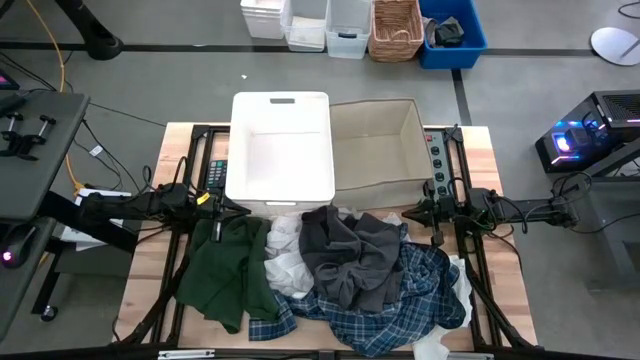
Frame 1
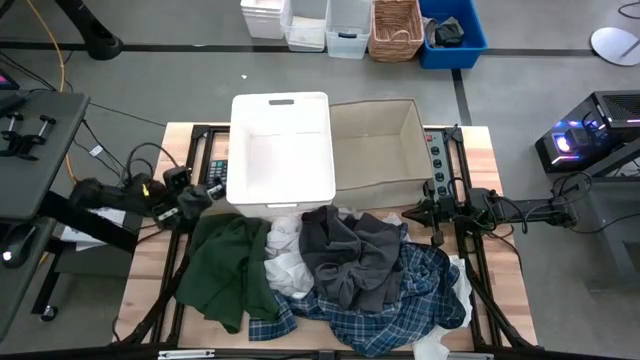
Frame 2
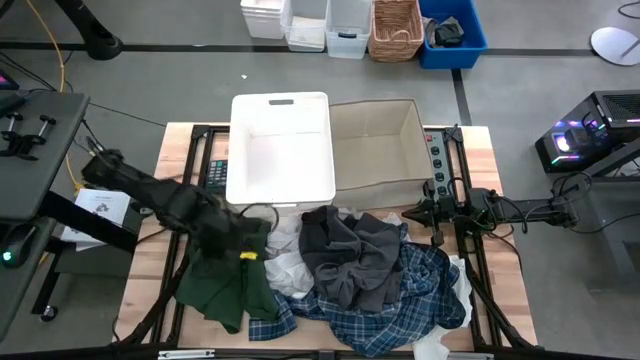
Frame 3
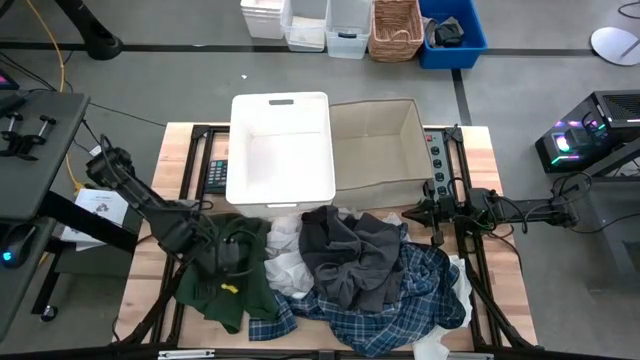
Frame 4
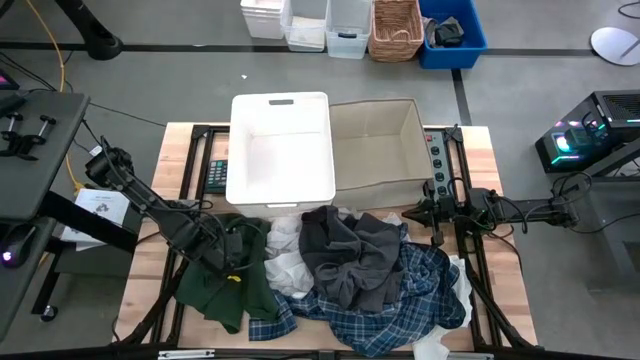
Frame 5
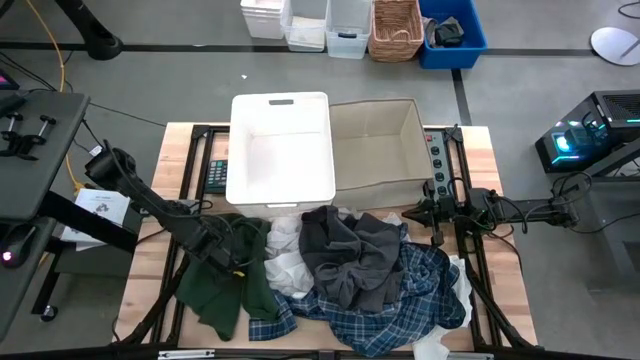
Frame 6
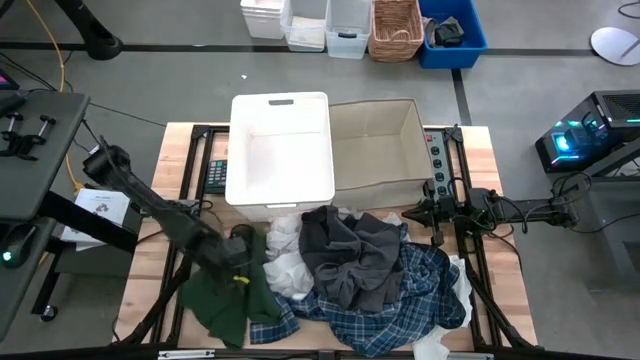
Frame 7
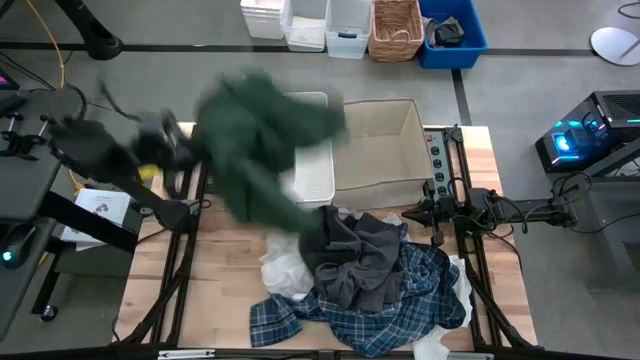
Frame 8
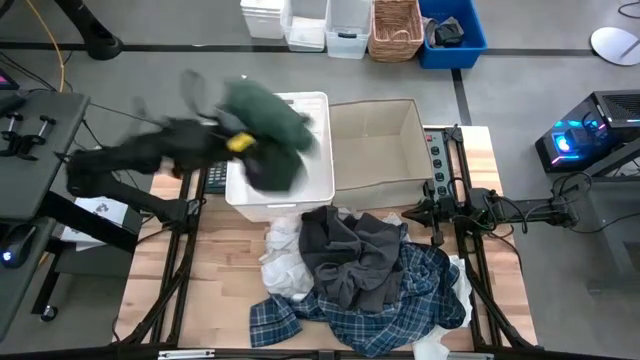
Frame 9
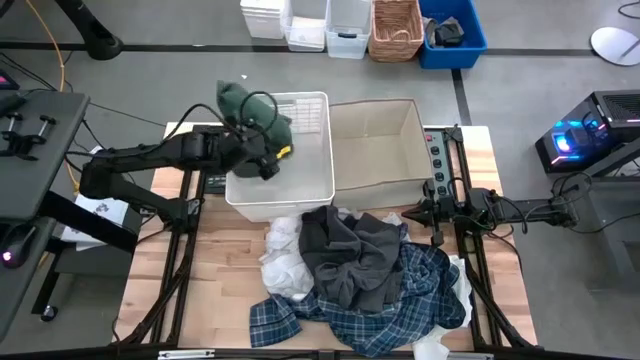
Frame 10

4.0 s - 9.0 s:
Task: Sort clothes
Put the green shirt into the white bin

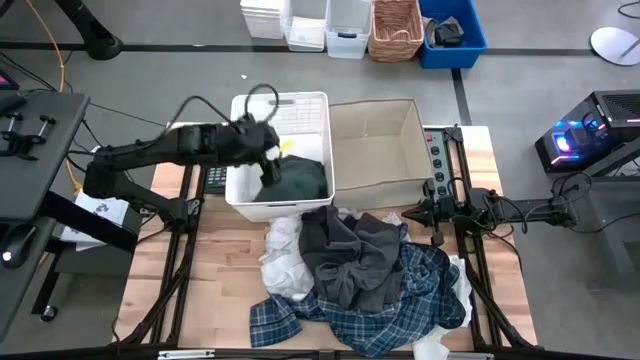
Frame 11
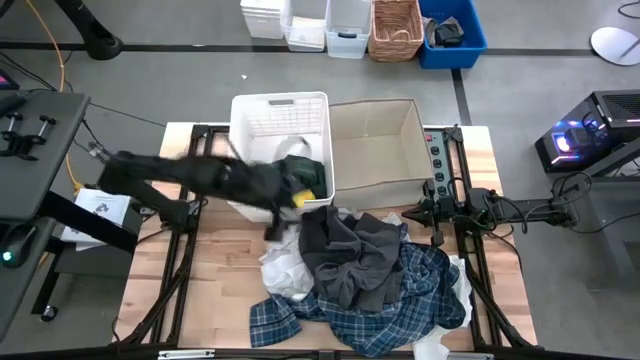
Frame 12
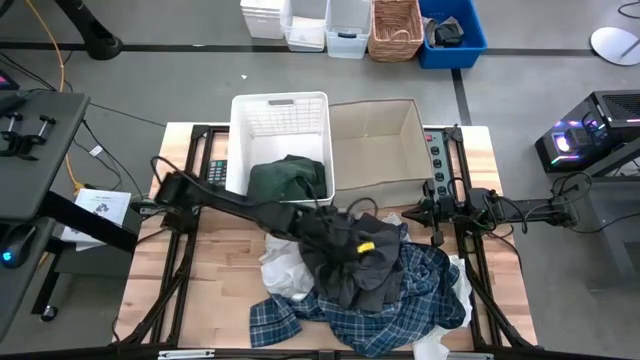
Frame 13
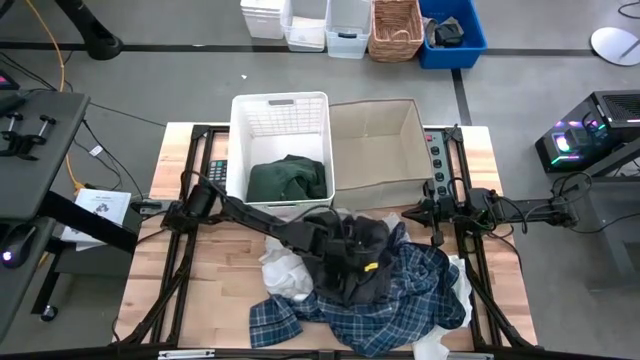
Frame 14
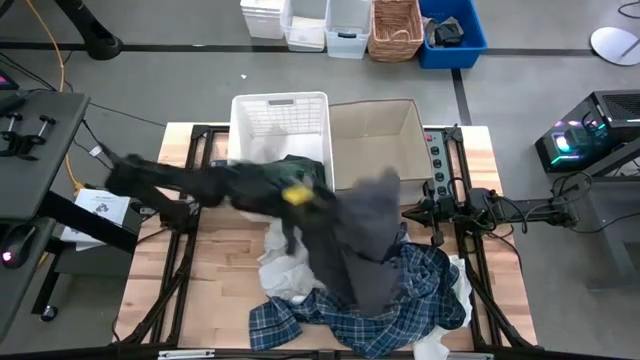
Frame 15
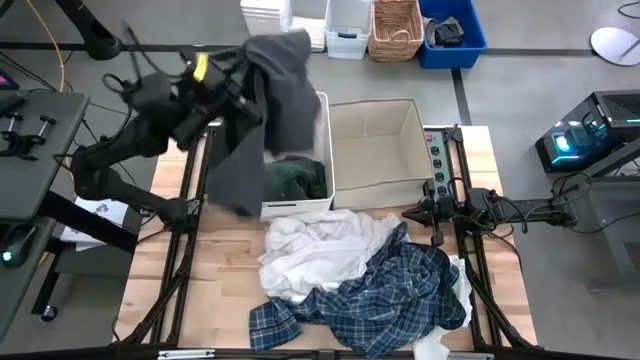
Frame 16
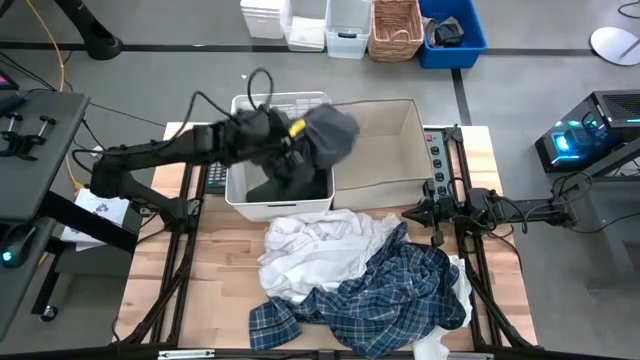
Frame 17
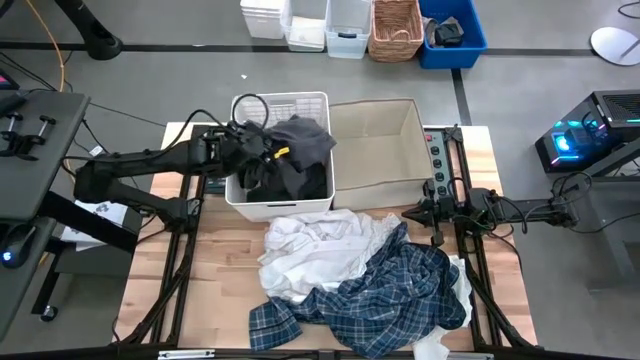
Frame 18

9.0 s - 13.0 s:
Put the gray shorts into the white bin

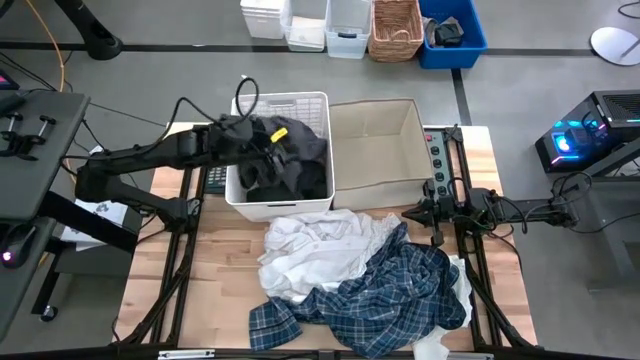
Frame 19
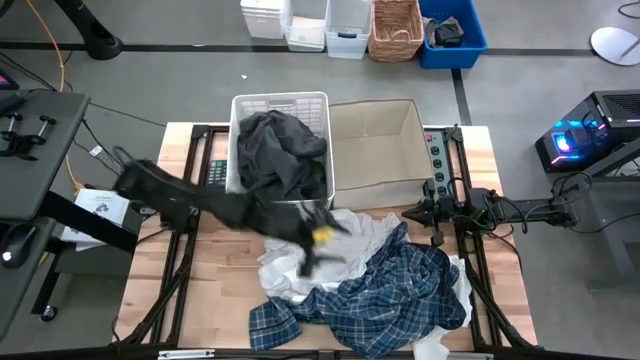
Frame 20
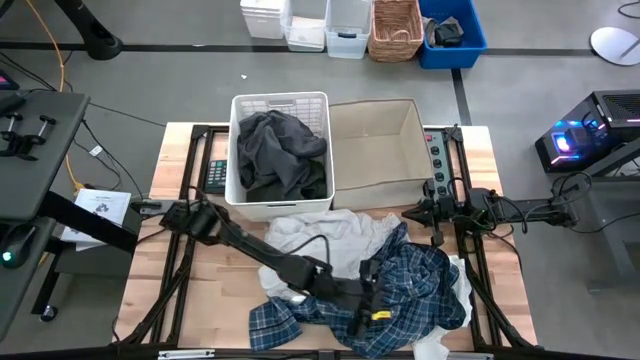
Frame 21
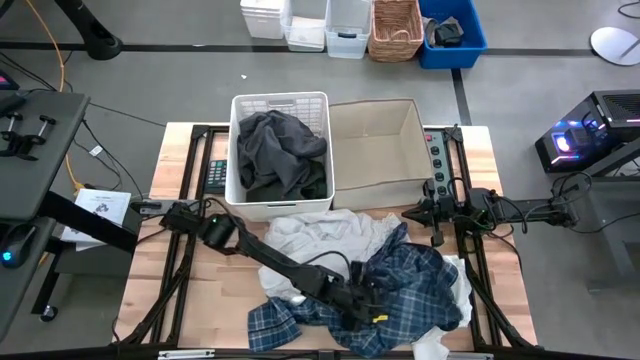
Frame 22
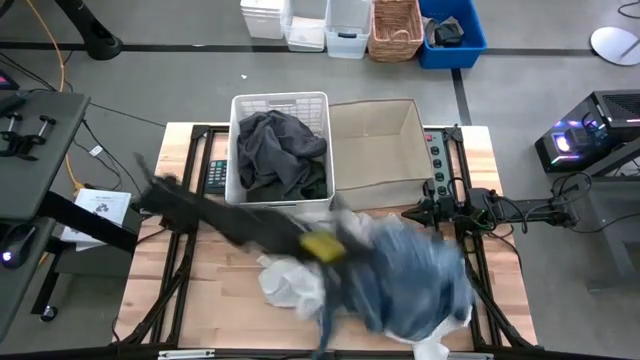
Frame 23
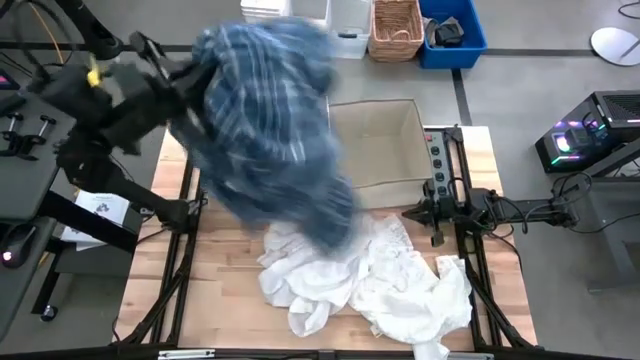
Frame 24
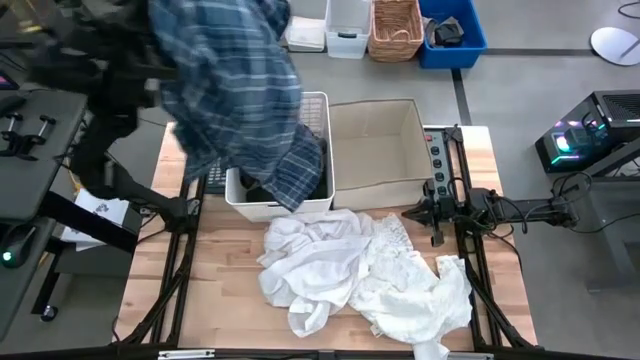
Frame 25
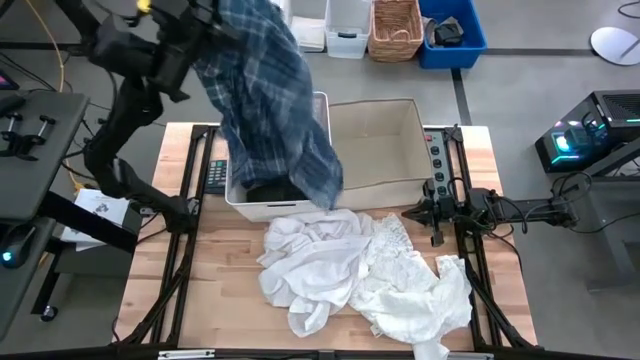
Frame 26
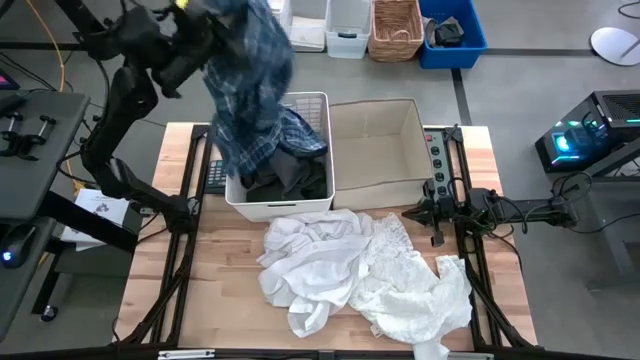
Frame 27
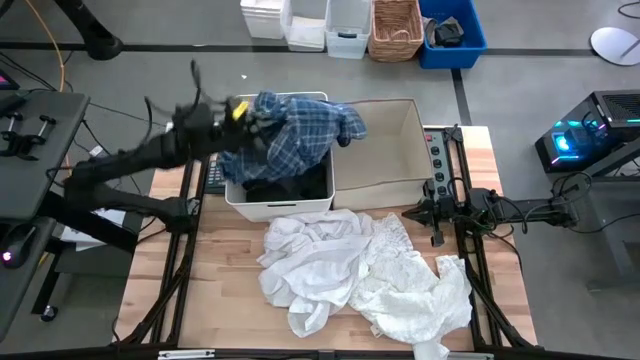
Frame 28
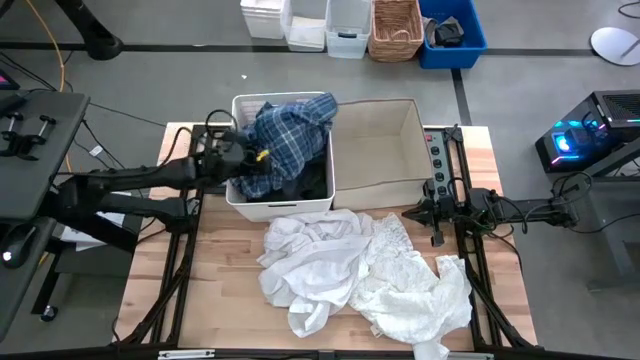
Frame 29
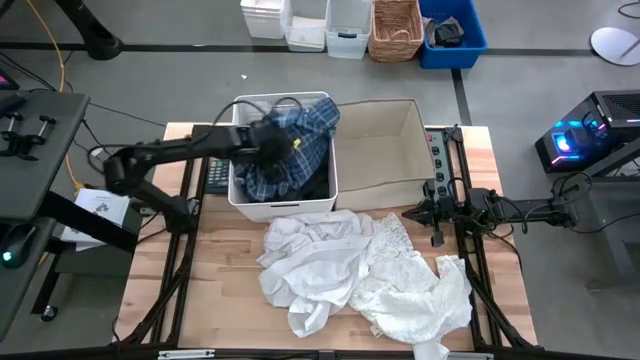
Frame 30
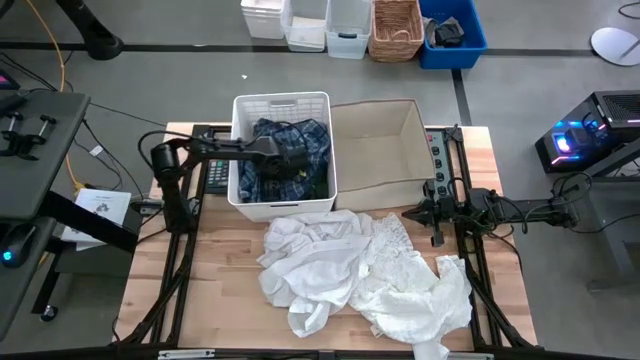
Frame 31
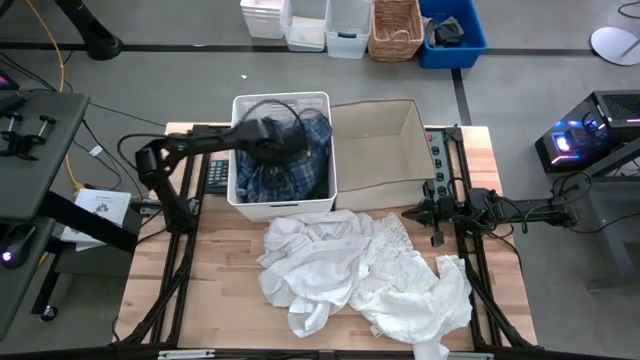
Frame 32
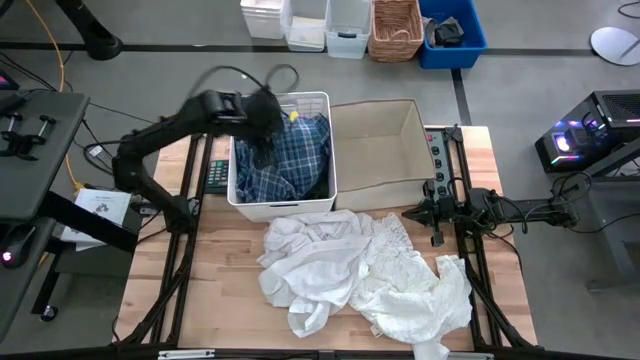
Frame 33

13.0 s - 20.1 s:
Put the blue patterned long sleeve into the white bin

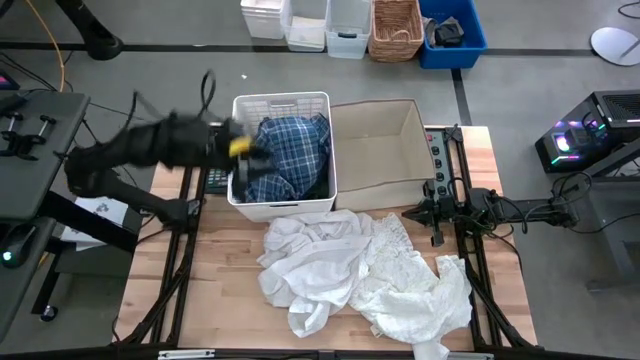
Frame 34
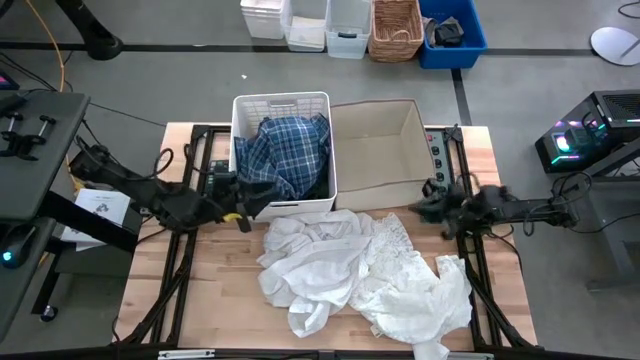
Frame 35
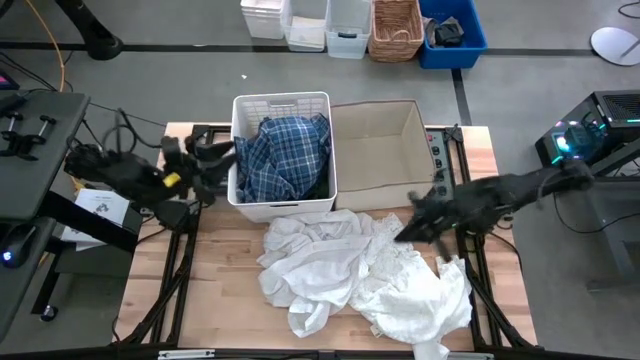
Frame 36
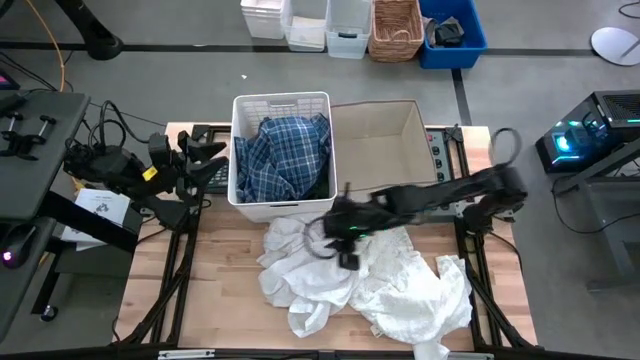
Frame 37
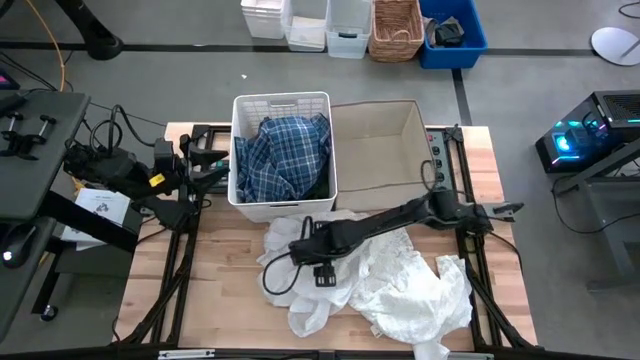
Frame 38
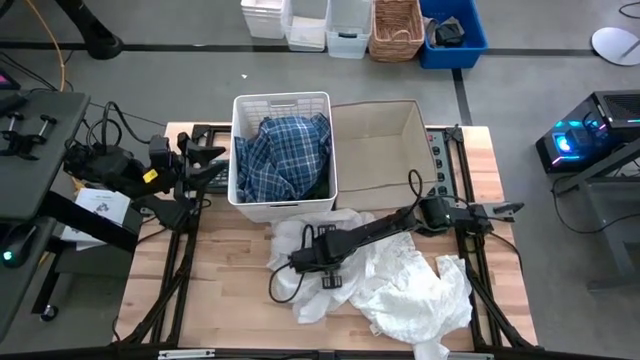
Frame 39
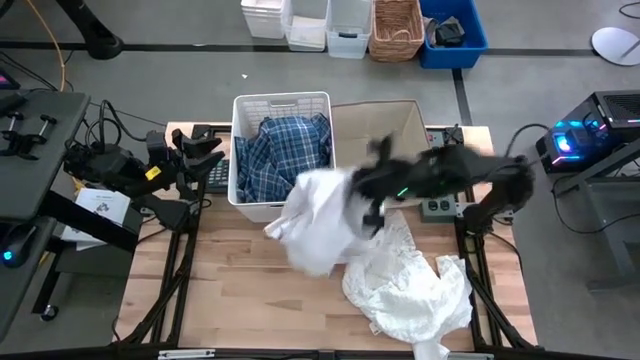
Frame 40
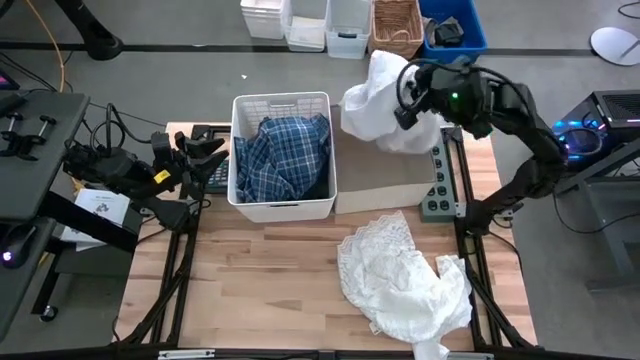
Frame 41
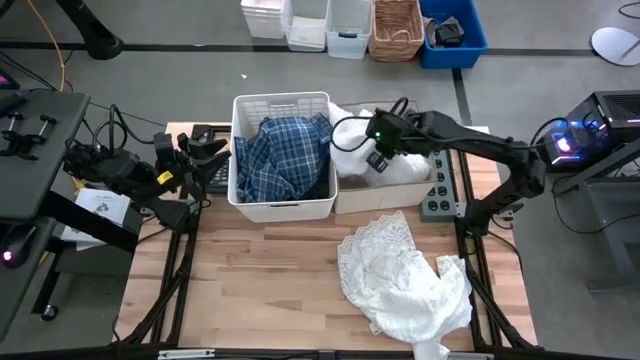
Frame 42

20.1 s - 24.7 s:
Put the white long sleeve into the laundry organizer

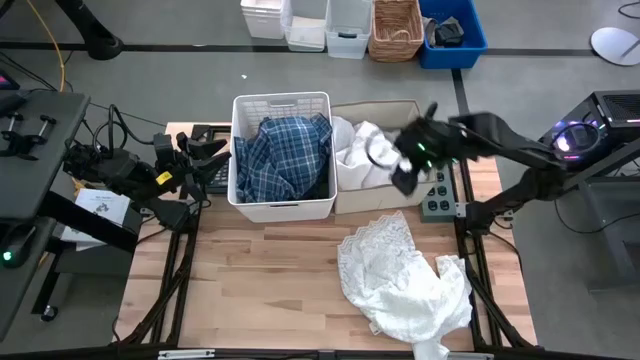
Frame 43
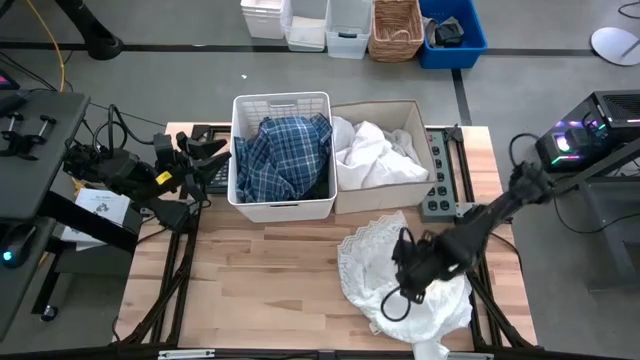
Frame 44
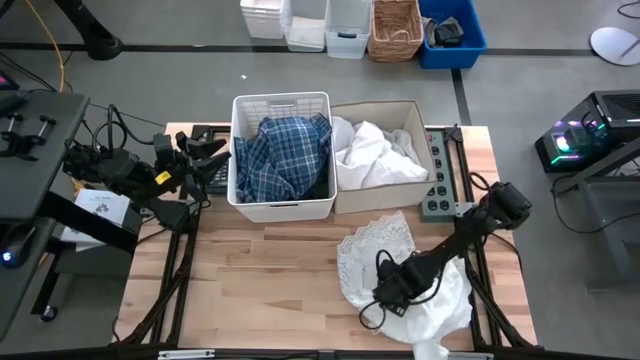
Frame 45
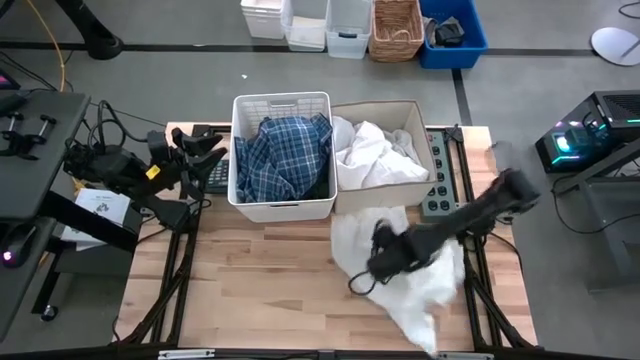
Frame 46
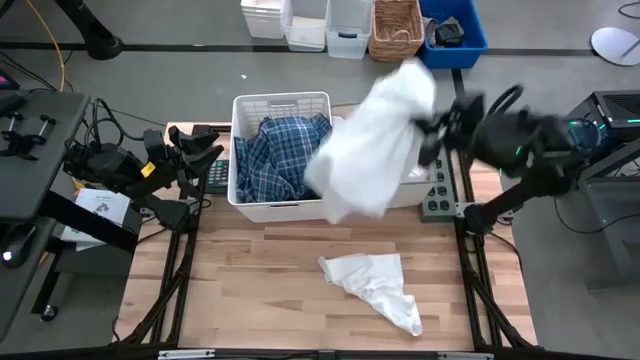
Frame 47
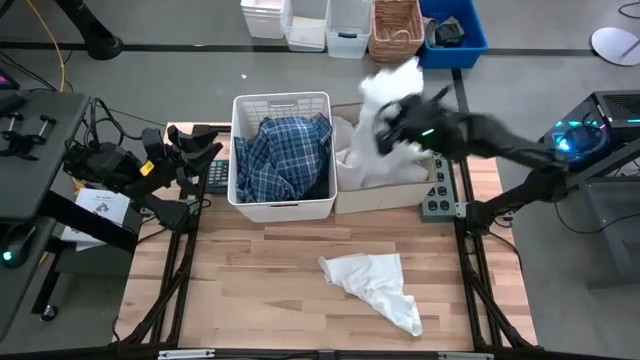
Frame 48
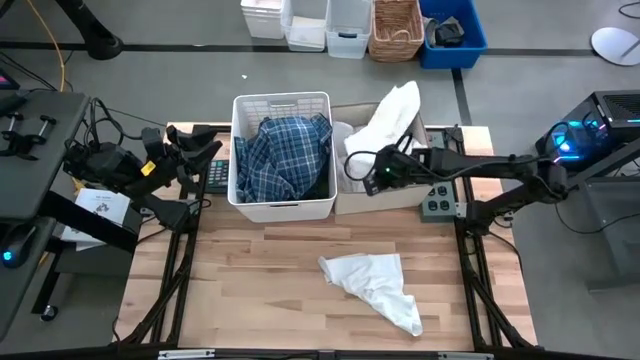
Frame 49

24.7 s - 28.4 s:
Put the white dress into the laundry organizer
